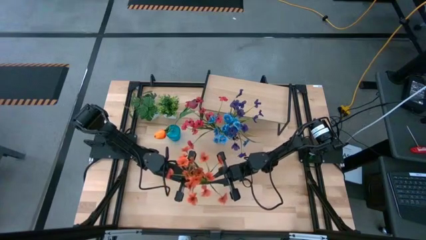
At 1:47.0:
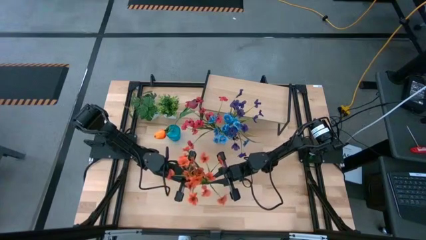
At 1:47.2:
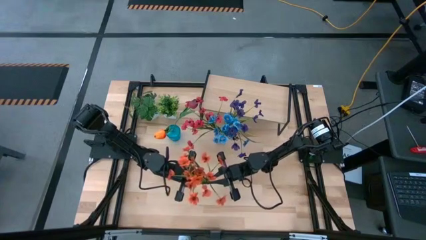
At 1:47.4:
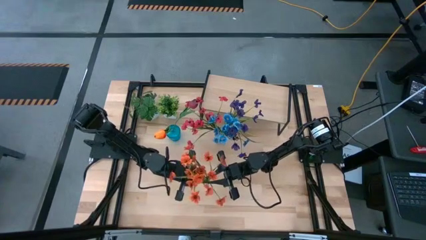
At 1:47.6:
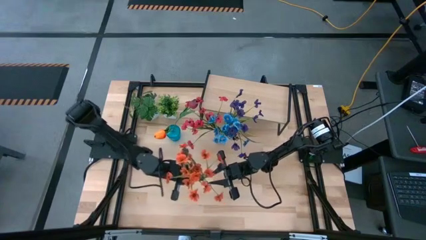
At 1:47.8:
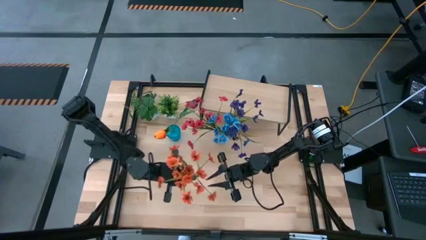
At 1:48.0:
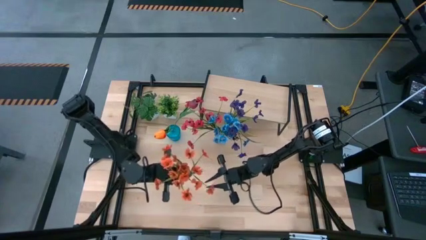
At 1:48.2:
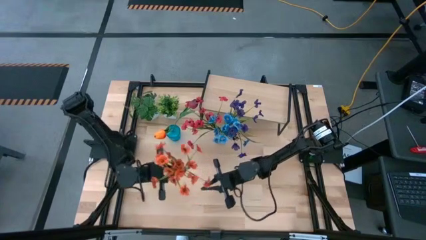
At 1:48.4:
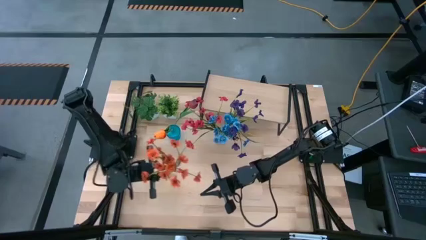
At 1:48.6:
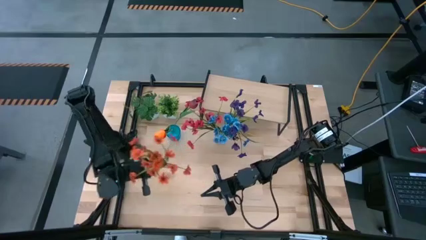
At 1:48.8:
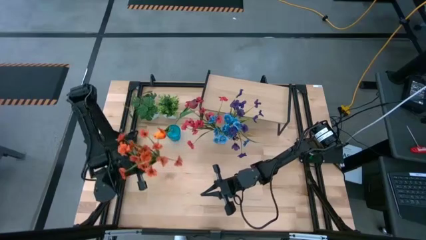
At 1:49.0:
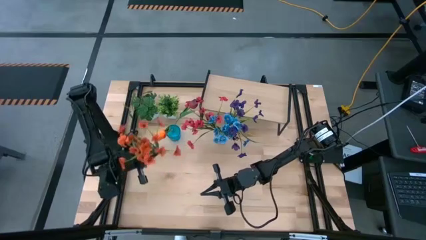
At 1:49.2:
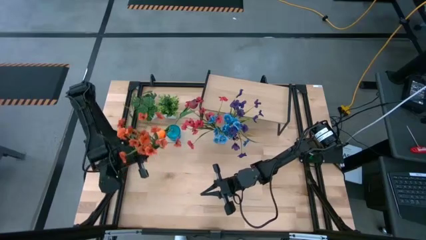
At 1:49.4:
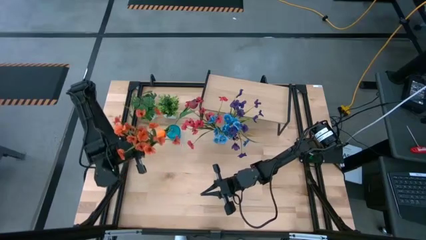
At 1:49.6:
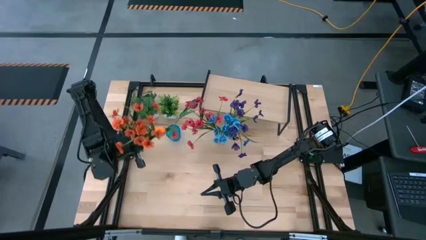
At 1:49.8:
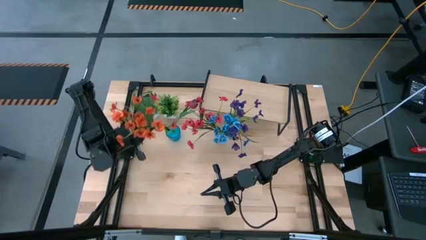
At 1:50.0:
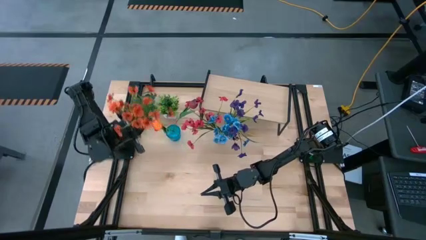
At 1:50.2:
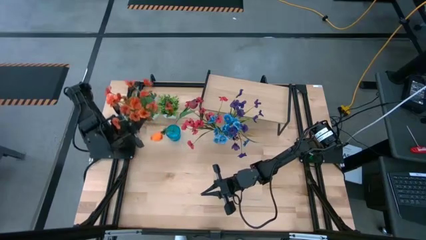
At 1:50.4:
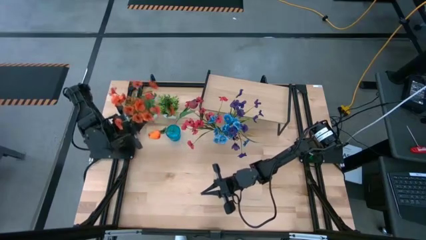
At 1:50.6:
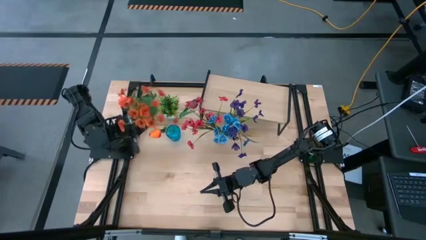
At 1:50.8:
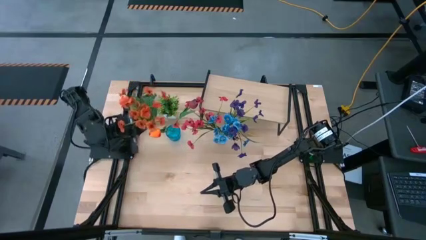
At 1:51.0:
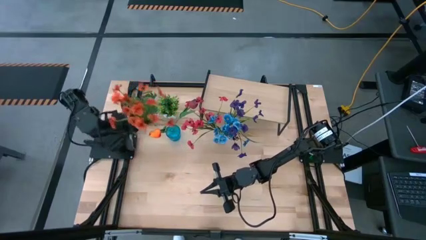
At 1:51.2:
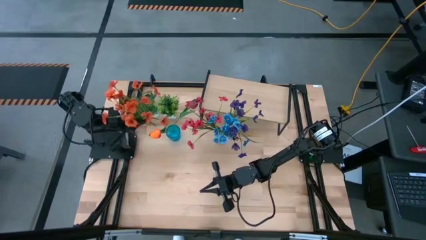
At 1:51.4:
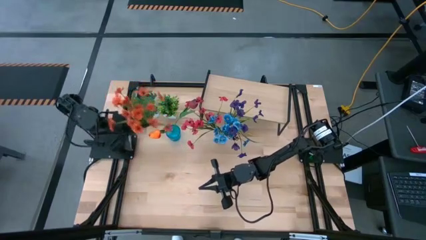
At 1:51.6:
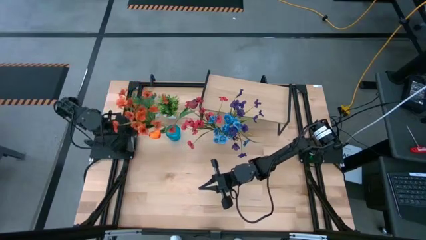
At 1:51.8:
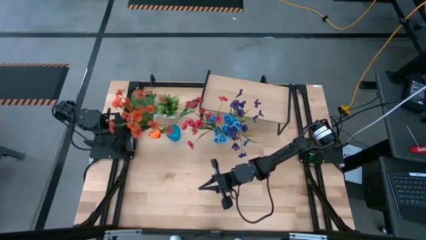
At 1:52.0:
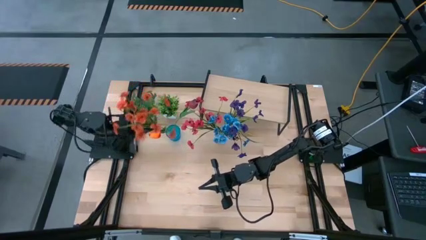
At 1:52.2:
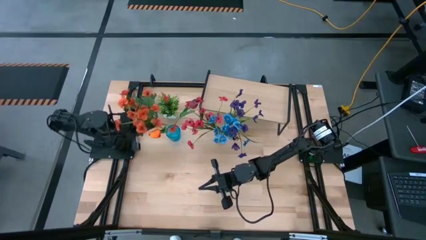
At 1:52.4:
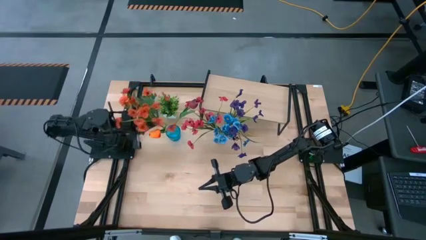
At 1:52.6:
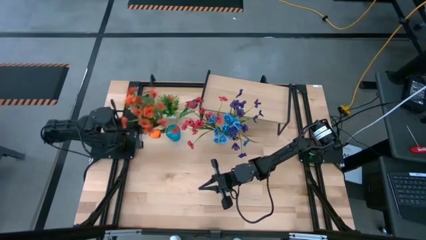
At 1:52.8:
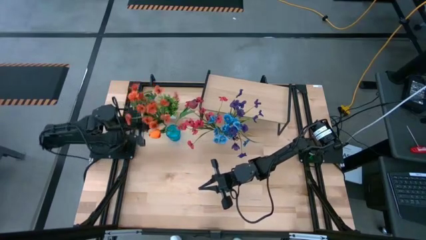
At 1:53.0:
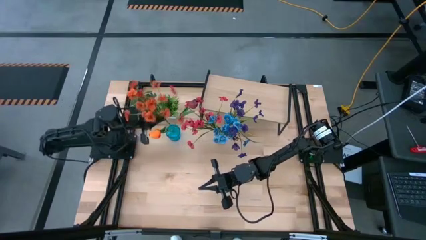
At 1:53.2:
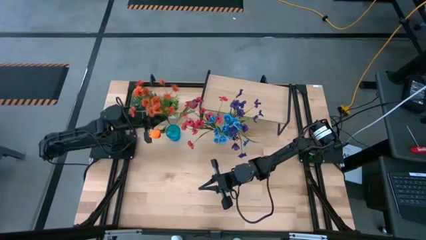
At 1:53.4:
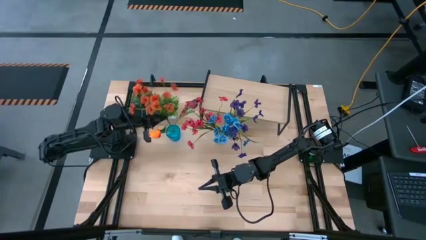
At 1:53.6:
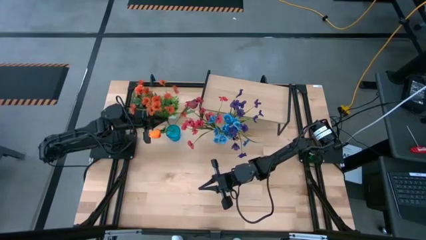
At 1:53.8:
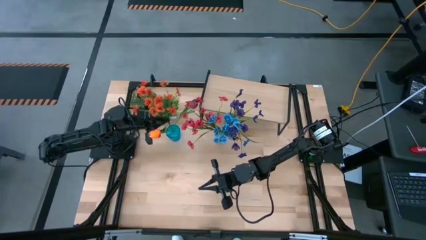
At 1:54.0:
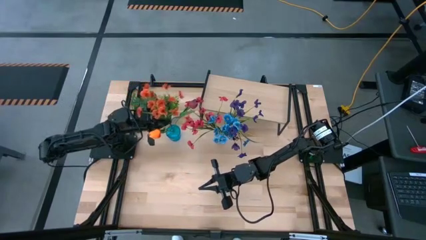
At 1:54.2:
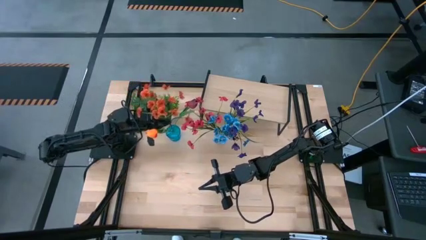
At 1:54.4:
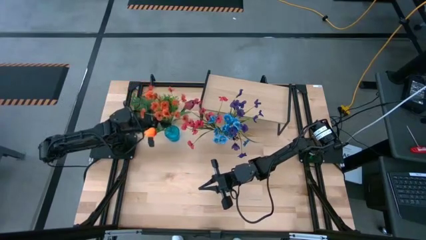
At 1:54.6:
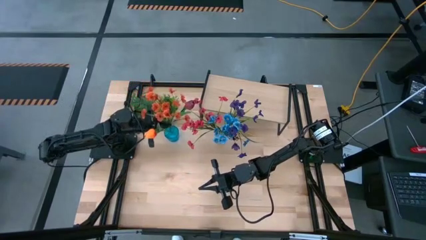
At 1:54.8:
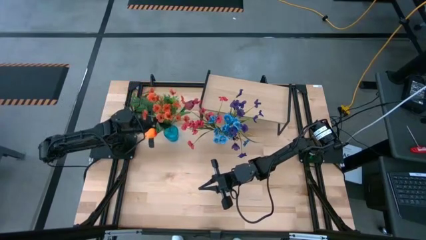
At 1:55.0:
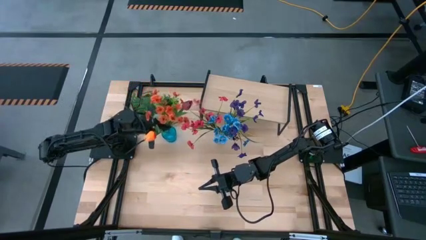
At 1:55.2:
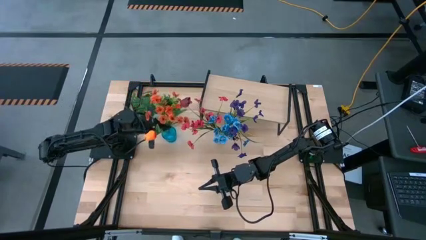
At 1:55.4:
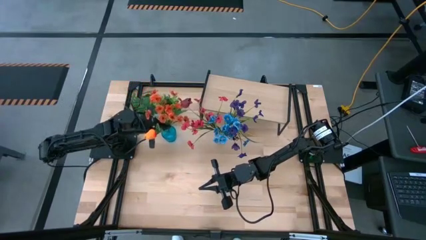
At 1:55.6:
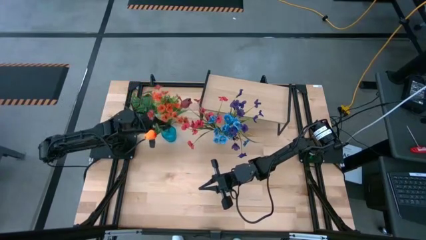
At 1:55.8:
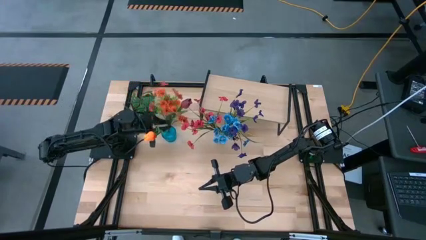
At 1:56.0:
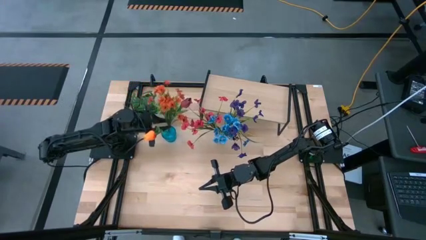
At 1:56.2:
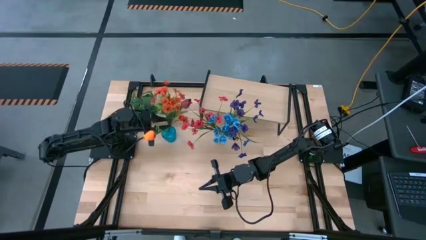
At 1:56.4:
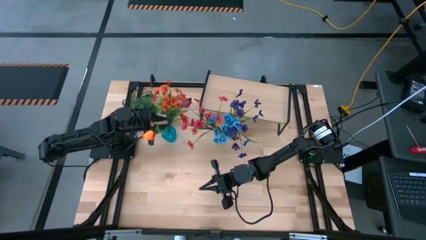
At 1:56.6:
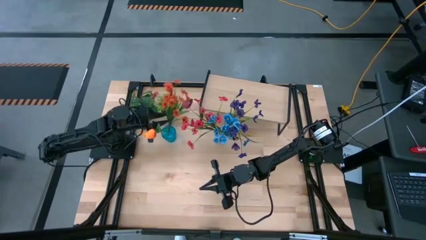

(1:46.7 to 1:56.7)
Task: Pick and place flowers into a vace then onto a shelf
Put the orange flowers into the blue vase
